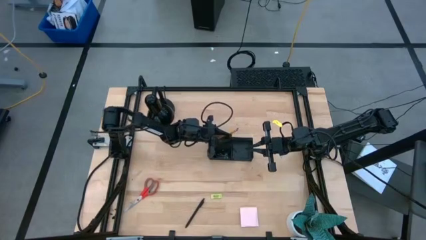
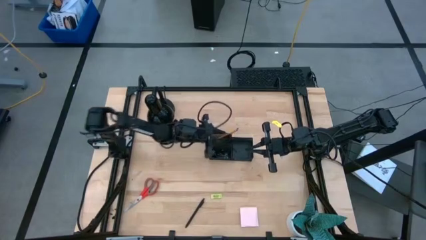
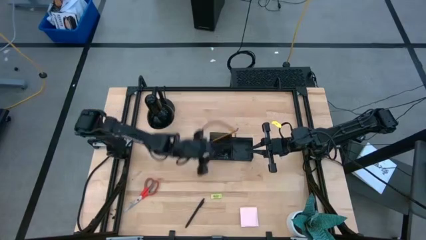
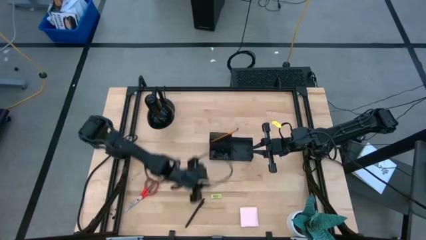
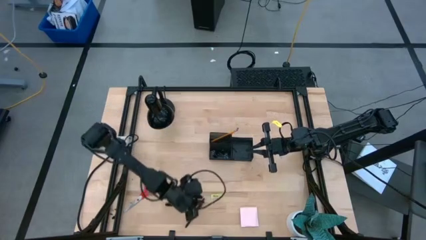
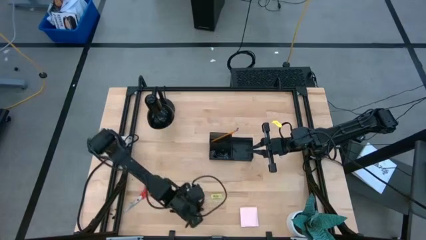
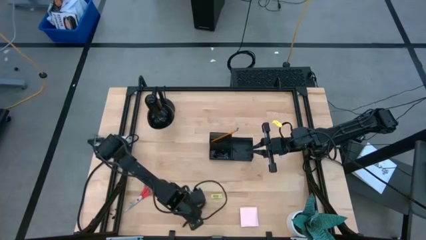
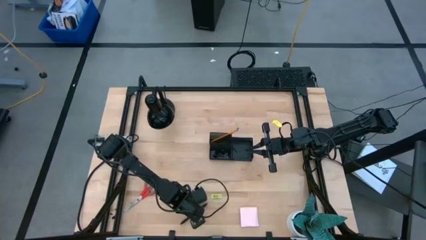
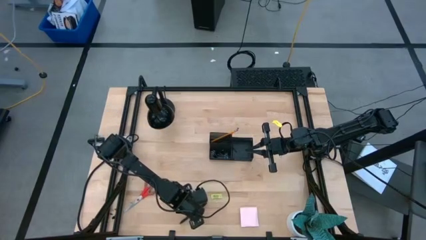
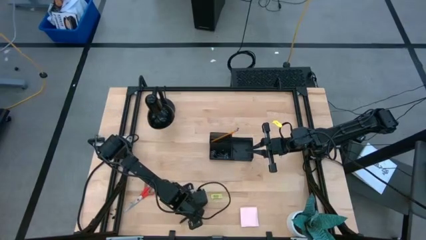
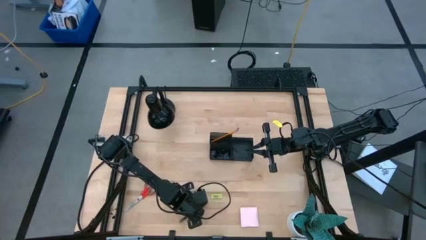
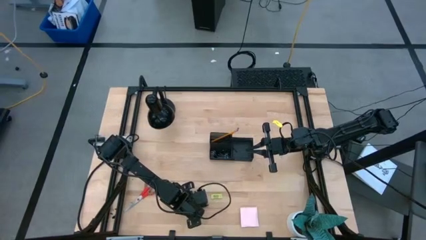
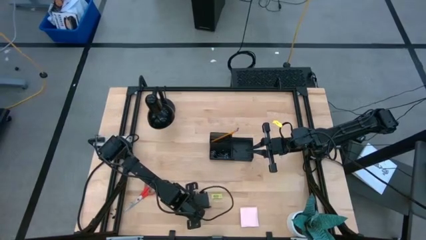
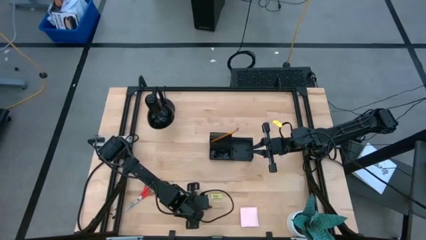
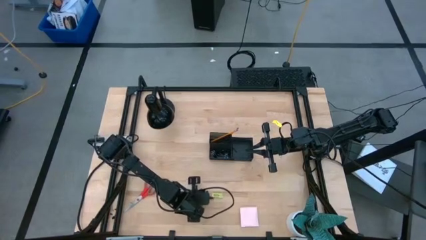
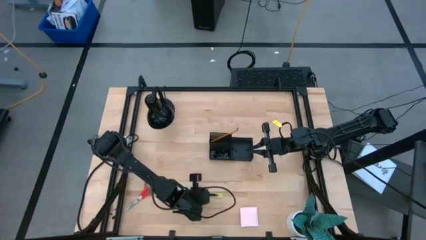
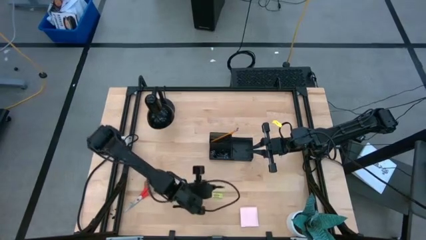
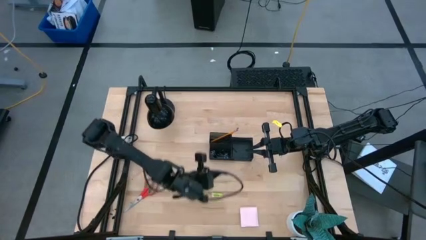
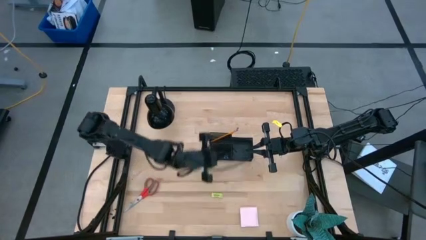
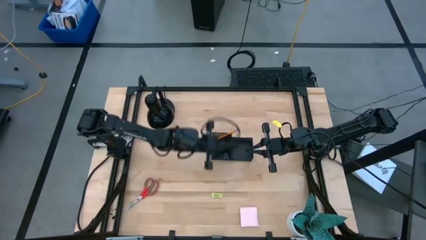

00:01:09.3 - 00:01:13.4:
Task: Pick and place office supplies into organizer
Put the black pen into the black desk organizer

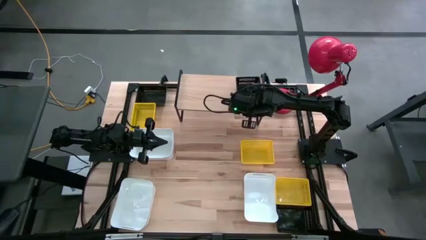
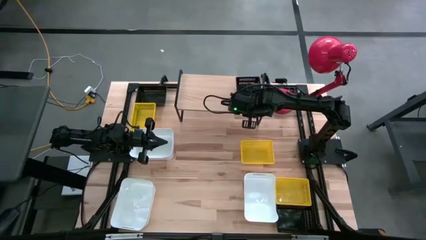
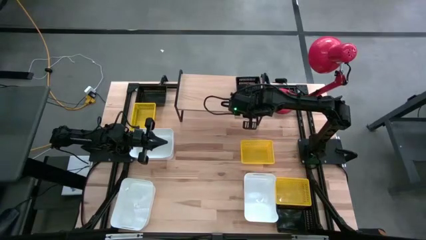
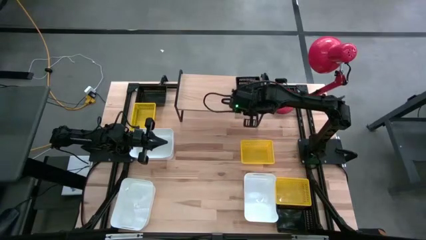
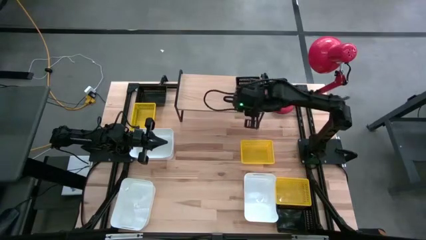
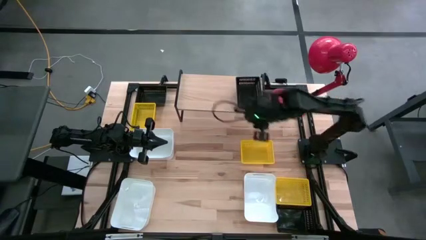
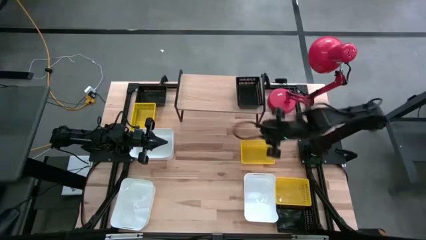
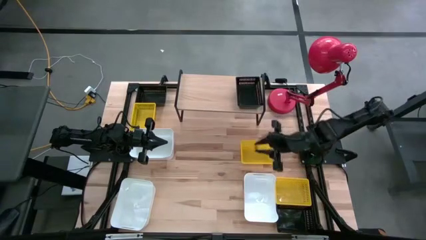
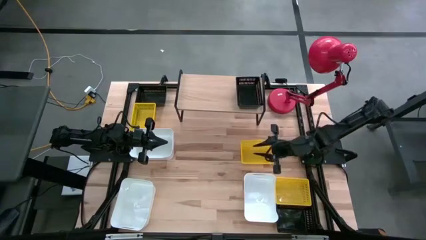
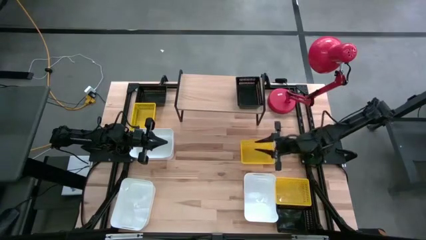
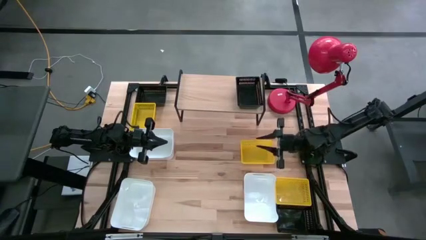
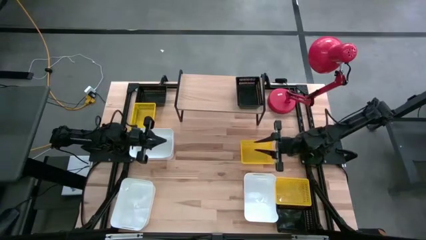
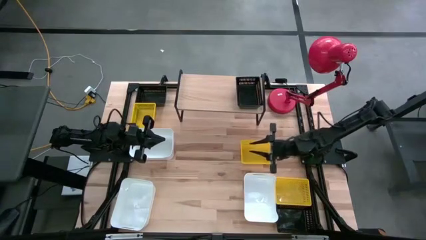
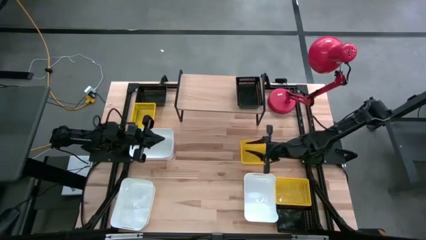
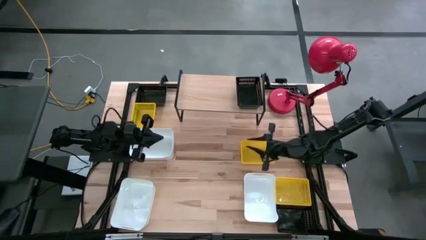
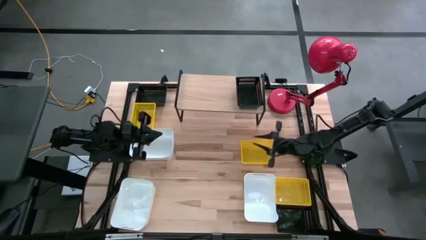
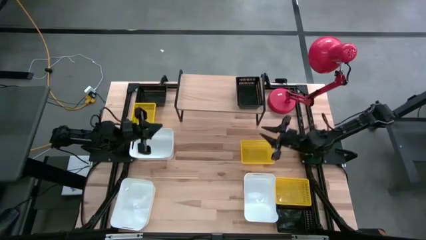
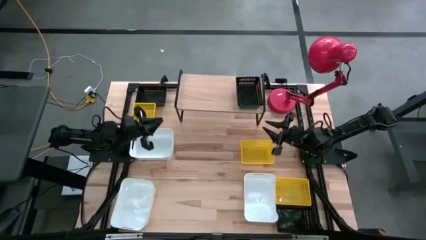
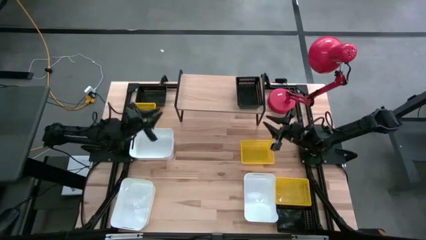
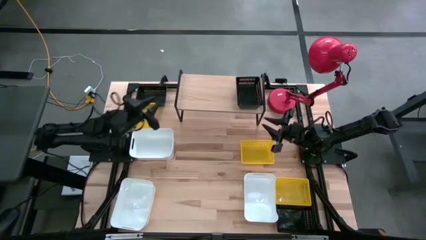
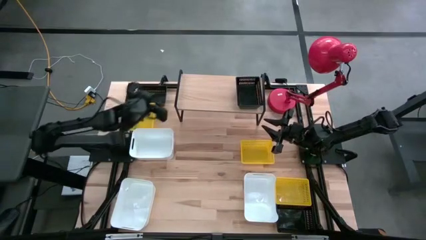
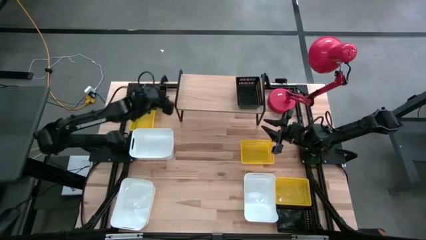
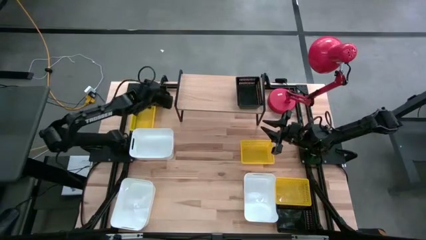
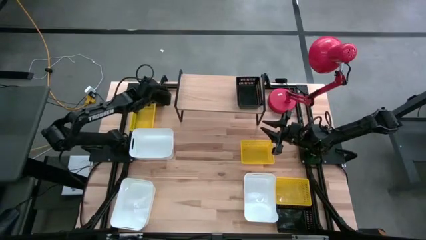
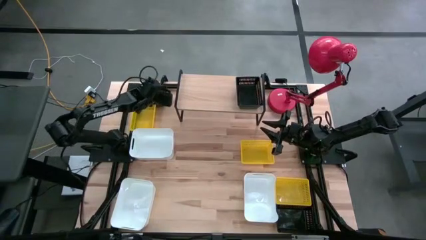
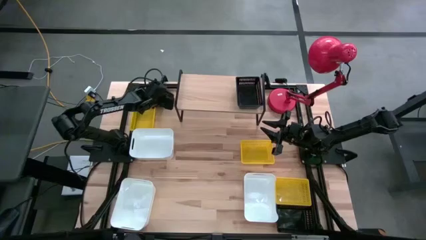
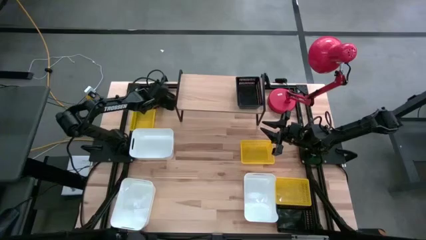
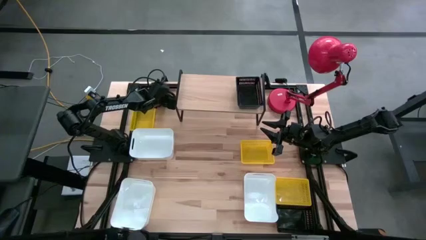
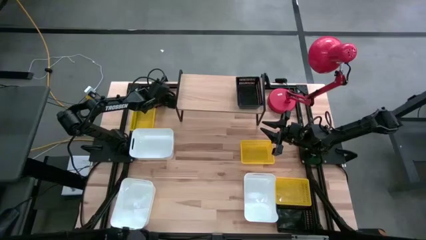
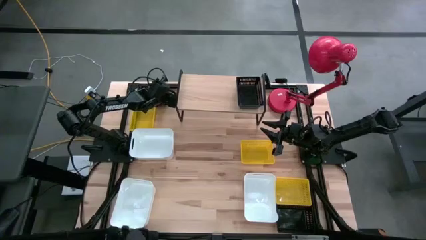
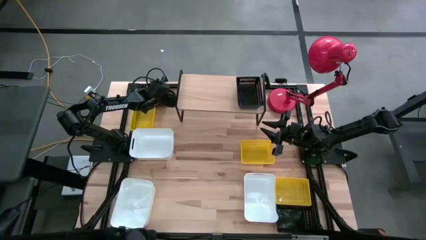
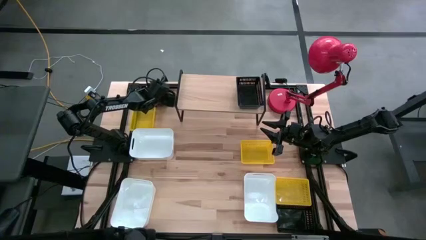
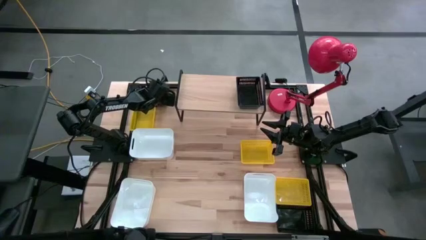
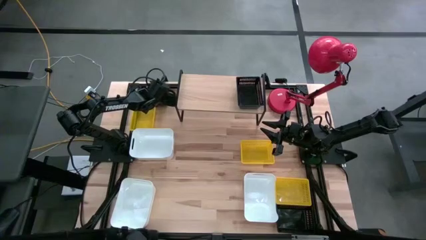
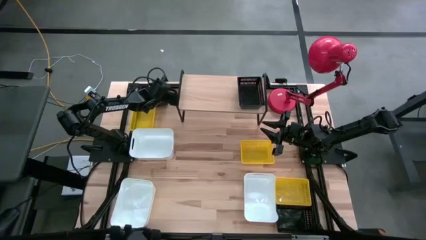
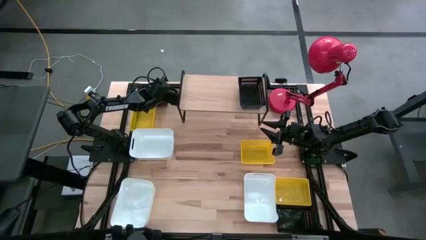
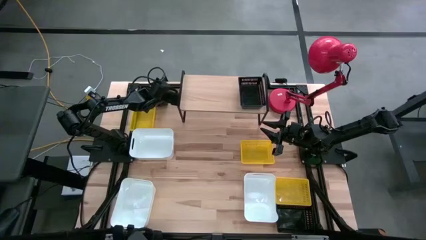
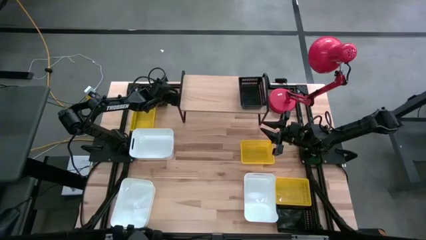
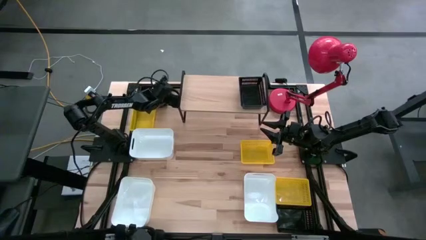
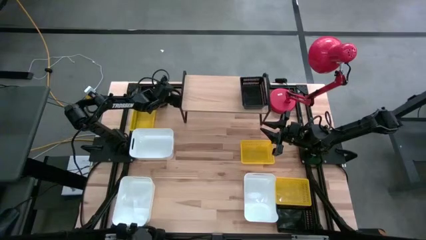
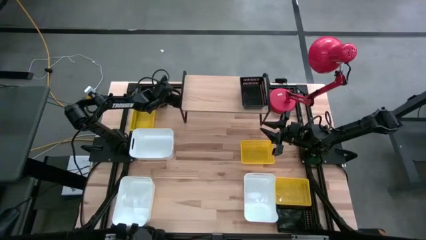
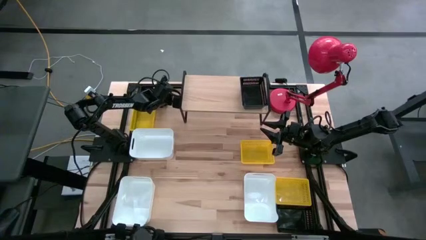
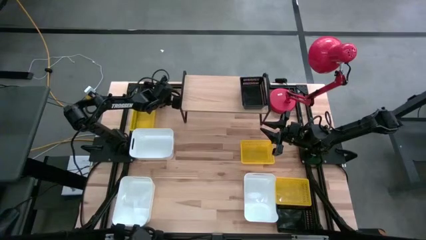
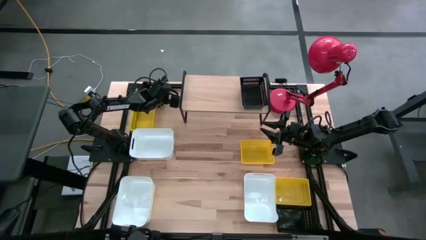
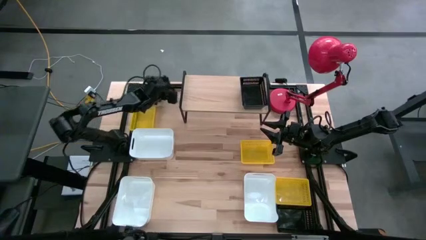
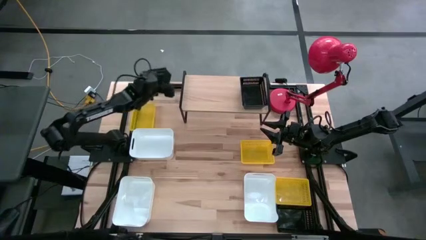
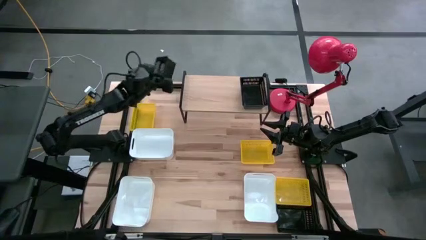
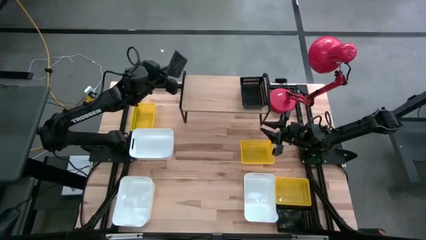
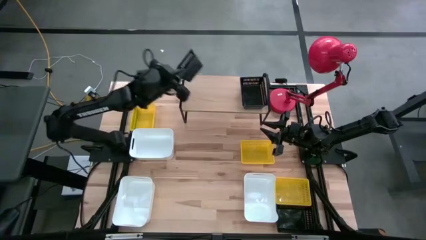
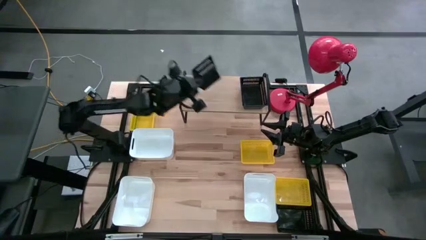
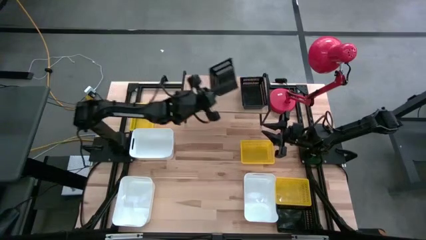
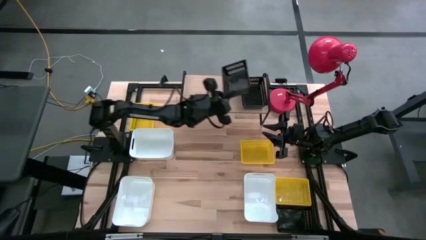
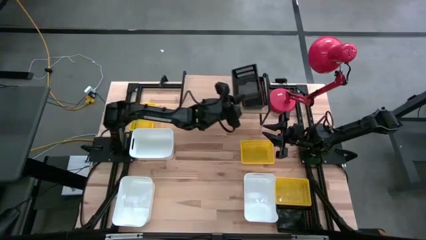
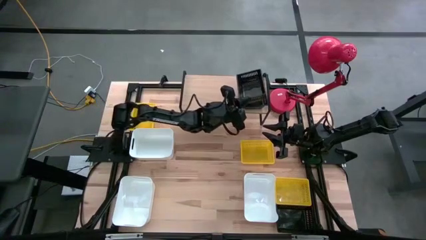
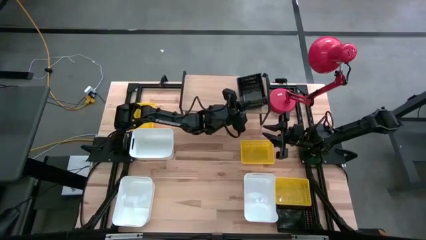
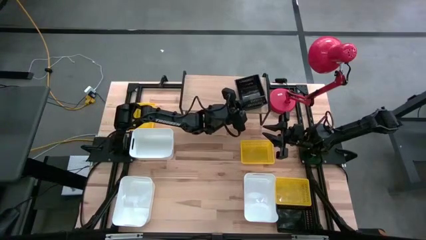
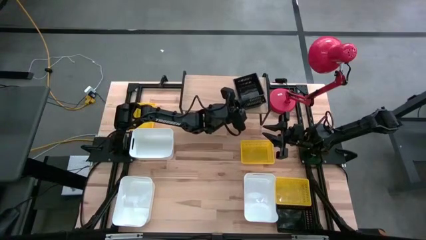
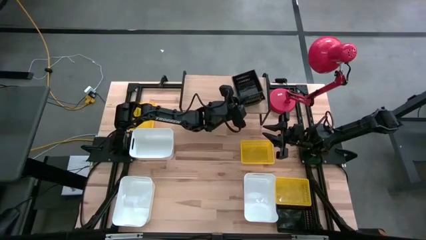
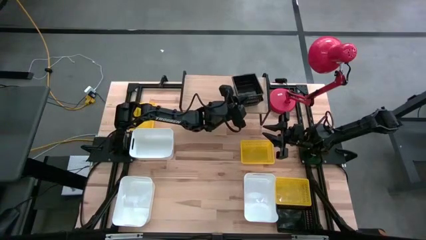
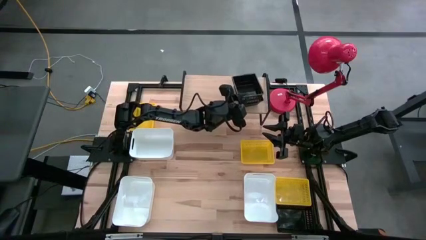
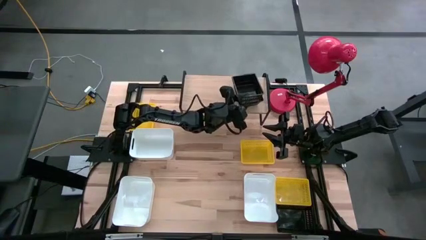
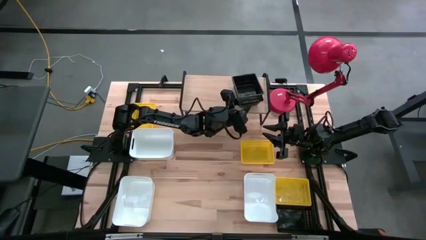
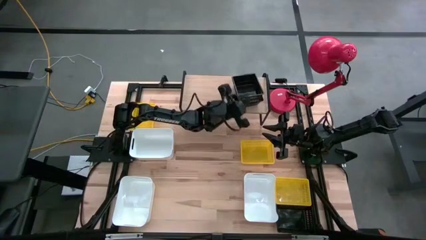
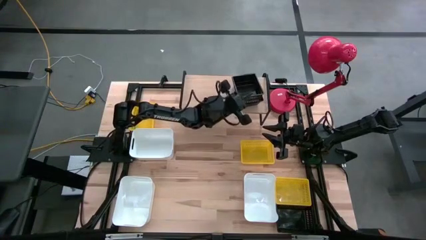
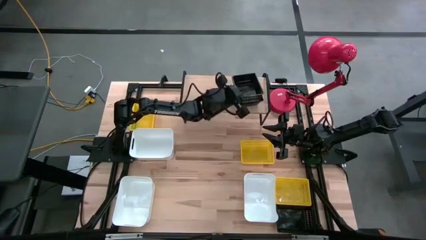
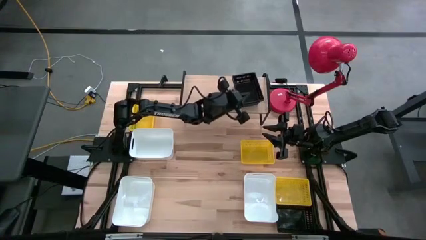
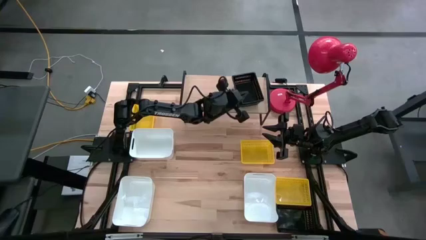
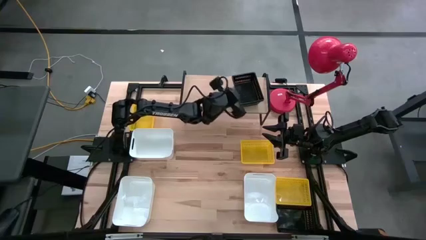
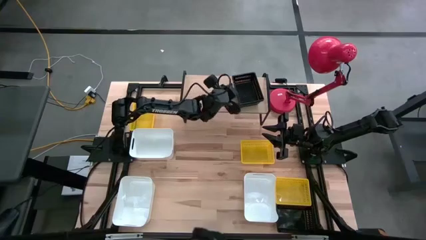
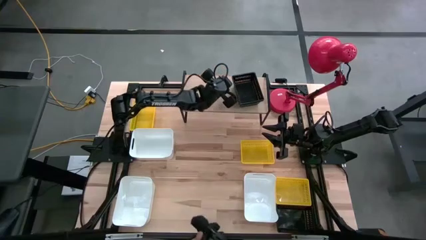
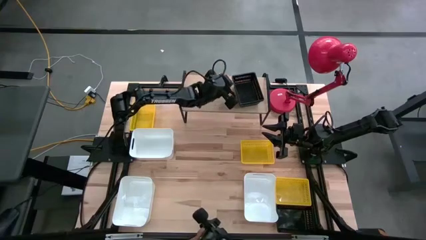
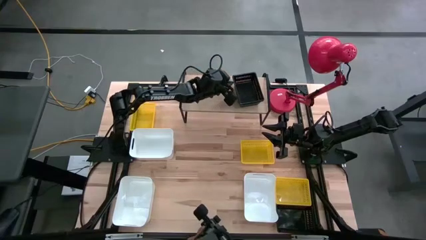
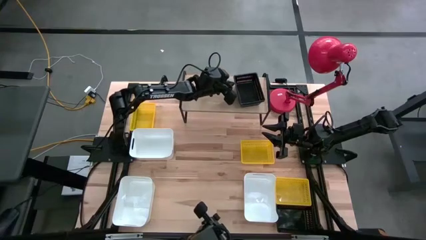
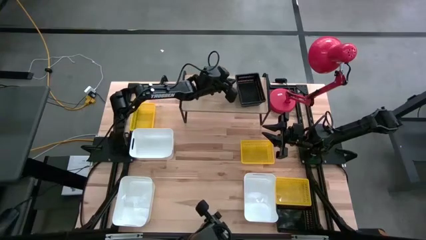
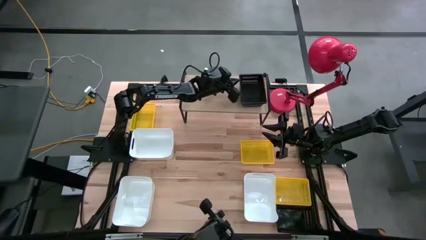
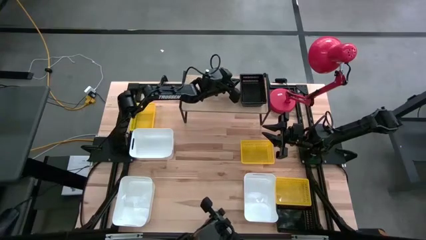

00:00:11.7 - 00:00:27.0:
Task: Stack baskets on shelf by color
Stack the top black bin on the other black bin on the shelf
